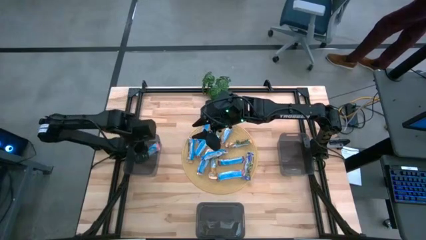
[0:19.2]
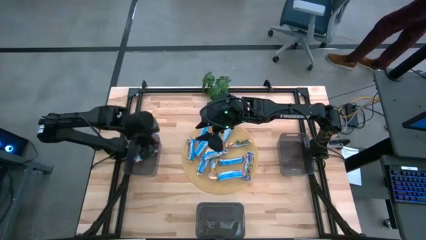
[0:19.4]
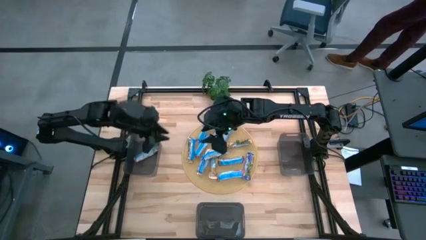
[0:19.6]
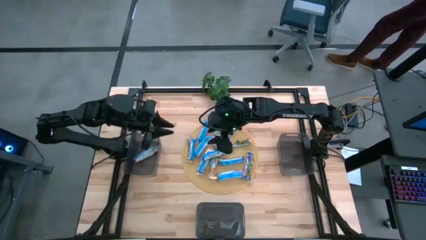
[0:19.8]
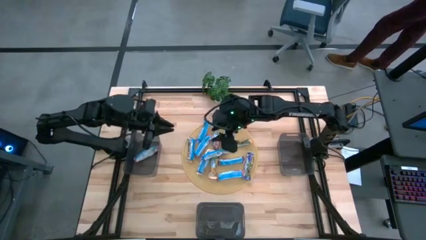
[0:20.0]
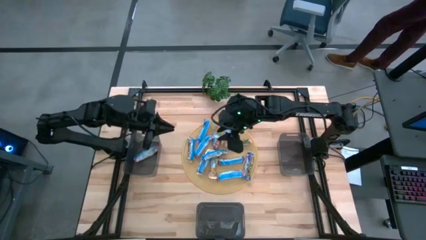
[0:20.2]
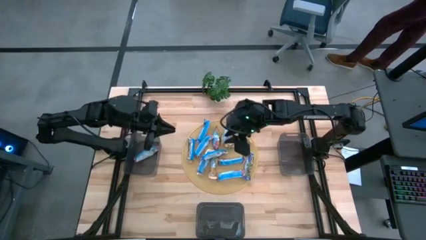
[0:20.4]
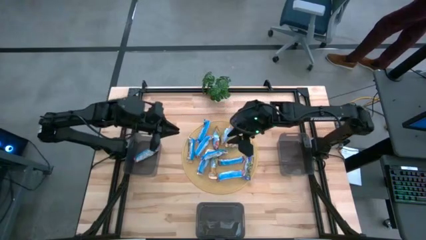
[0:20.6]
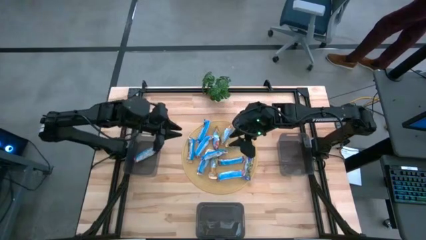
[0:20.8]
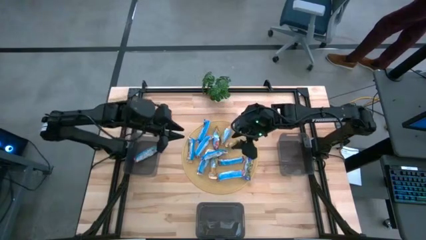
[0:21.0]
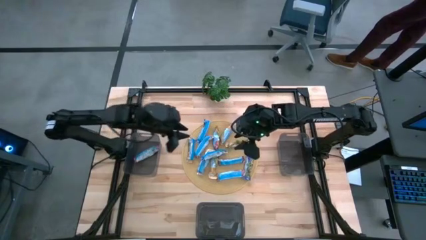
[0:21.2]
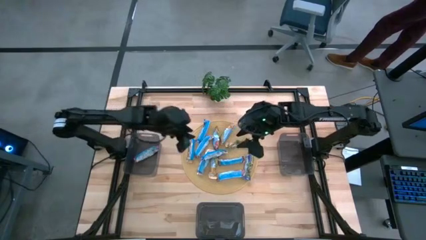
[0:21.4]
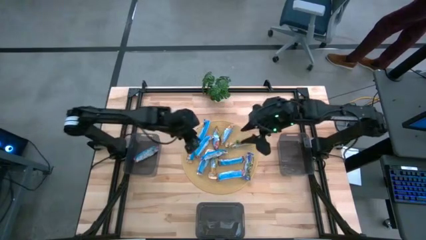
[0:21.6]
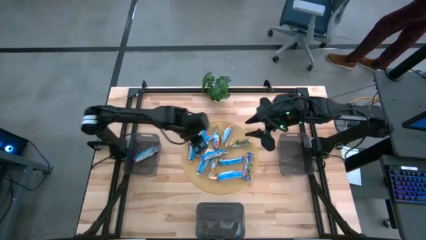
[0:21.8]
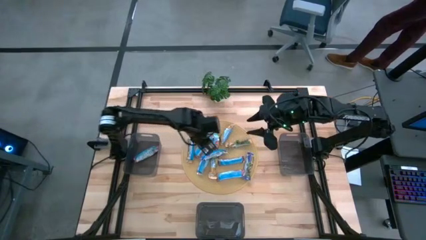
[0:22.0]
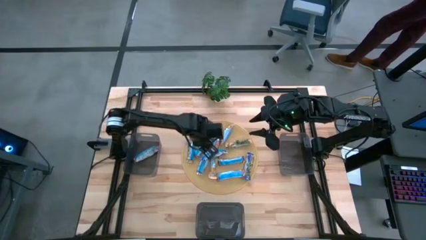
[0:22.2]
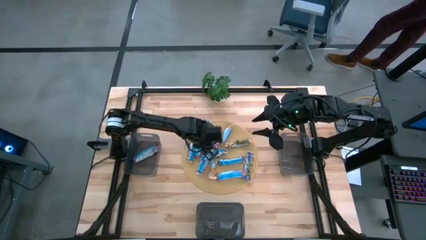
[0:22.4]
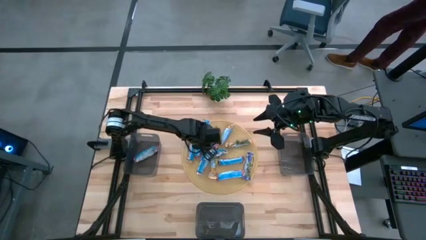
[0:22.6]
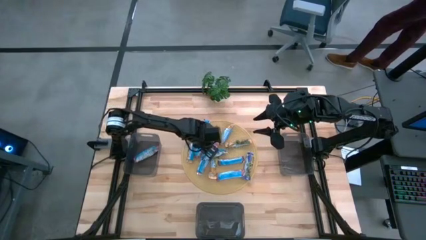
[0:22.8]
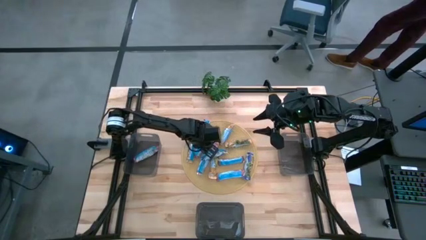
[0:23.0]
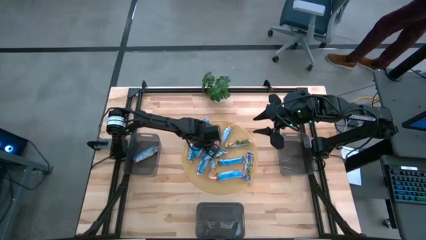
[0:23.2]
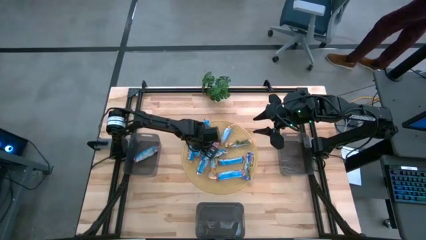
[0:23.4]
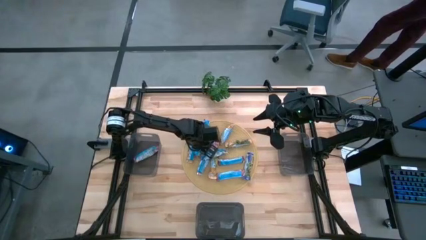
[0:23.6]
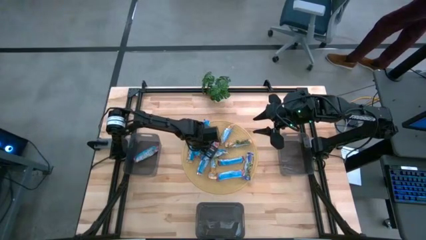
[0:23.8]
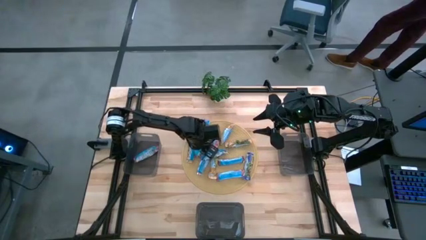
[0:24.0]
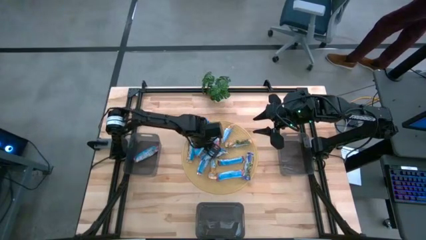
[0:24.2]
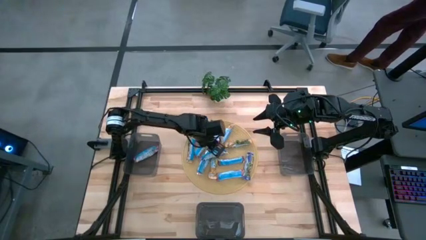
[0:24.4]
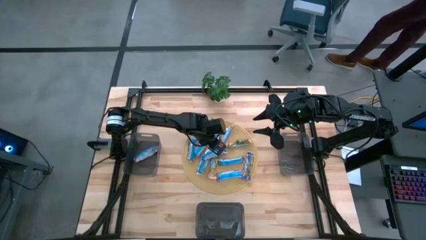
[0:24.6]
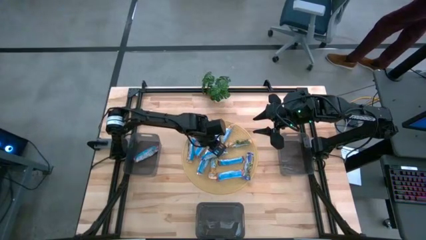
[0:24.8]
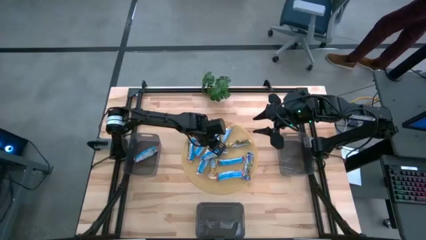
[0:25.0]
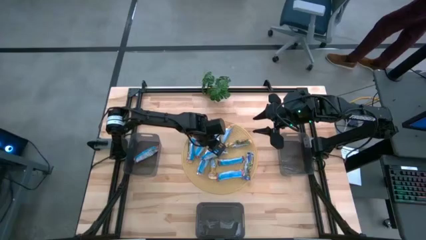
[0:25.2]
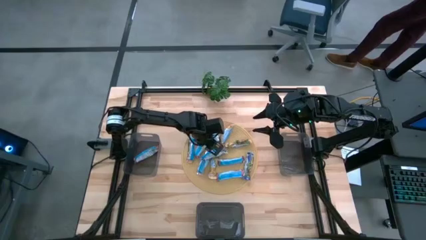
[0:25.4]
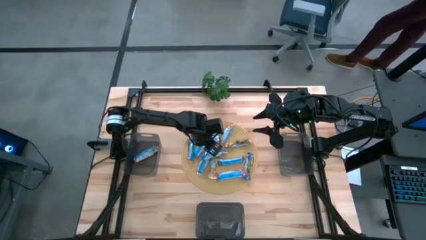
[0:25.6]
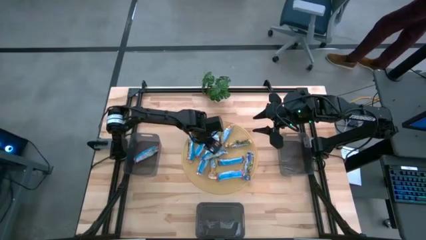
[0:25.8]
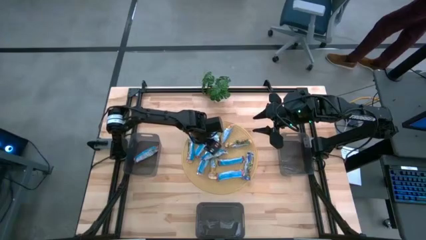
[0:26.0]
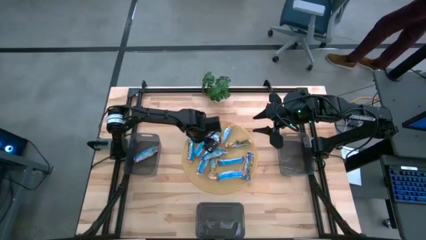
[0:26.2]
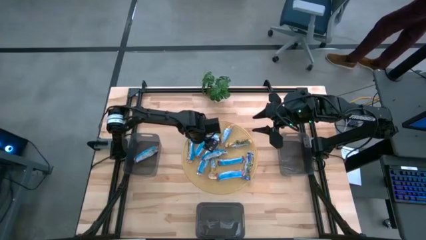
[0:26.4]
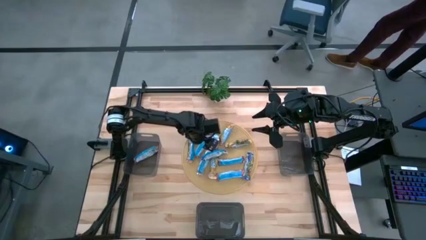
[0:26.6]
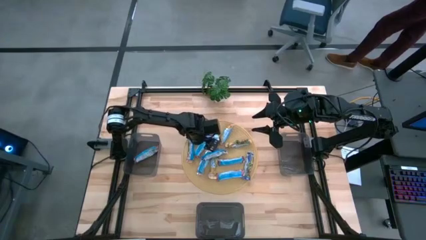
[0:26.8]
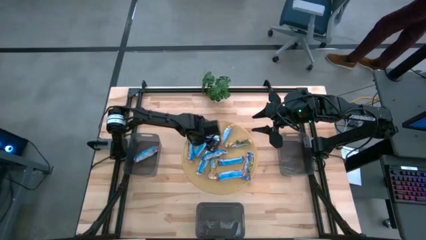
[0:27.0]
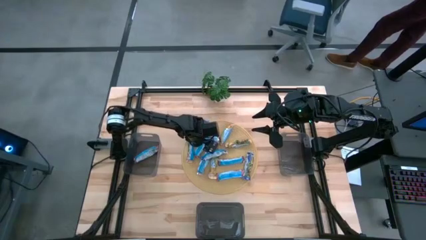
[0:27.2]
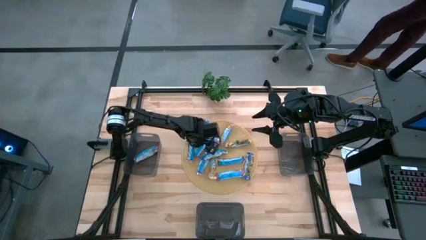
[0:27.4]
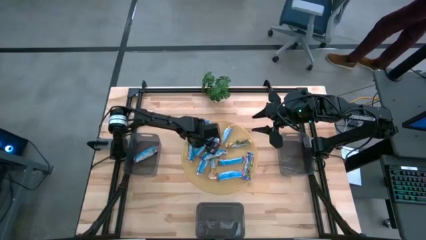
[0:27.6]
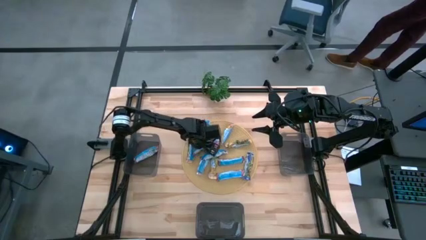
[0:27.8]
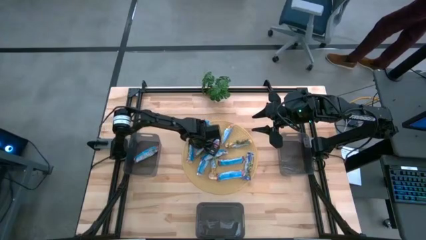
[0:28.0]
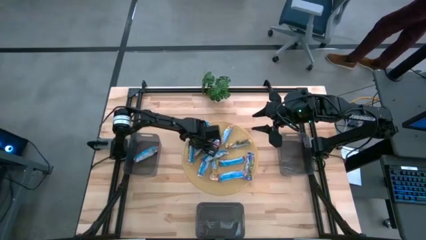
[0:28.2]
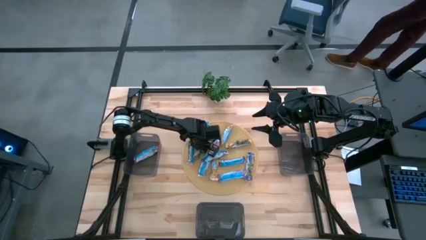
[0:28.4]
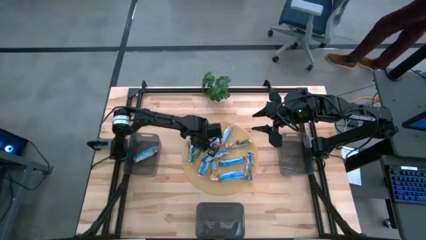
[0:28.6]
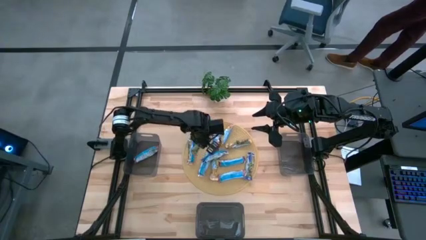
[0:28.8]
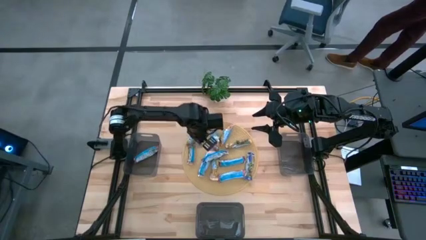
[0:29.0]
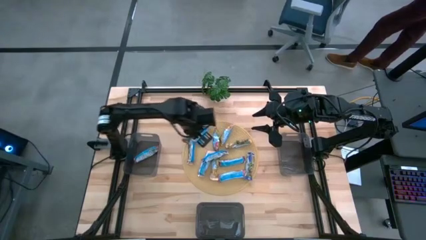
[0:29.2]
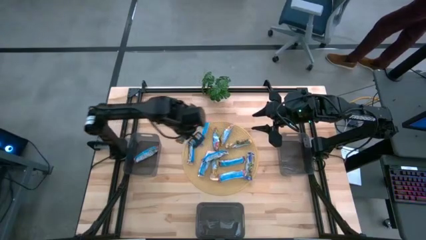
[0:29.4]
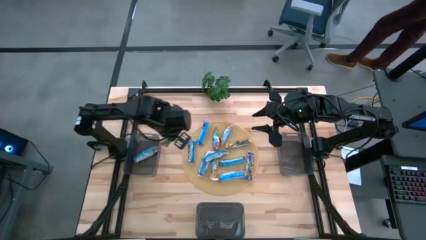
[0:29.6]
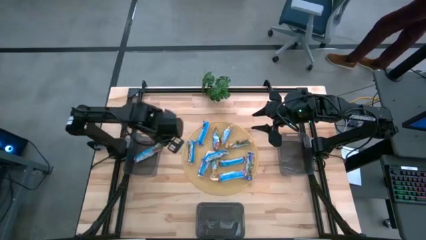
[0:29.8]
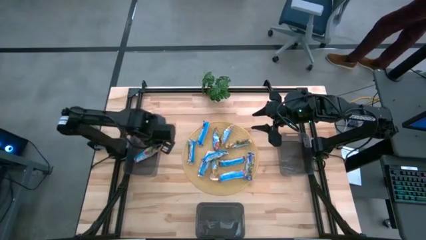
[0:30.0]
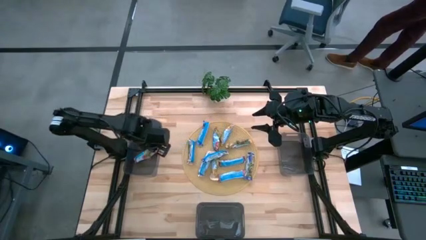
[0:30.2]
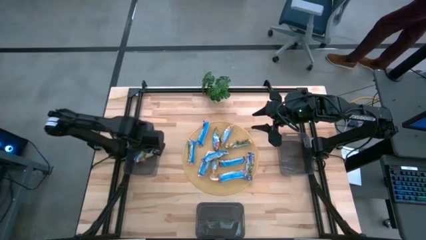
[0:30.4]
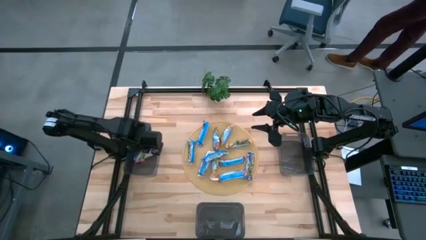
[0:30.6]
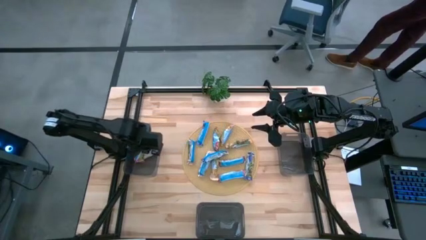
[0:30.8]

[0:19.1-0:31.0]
Task: Pick and place Granola Bars by type
Put the red granola bar into the top left bin
